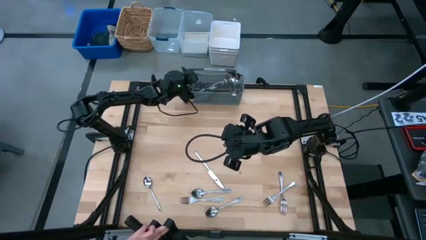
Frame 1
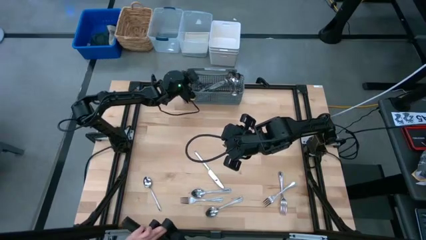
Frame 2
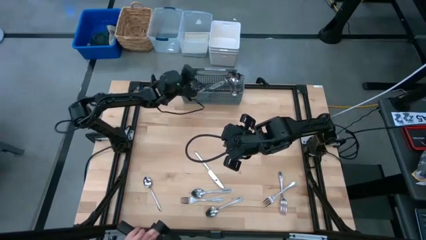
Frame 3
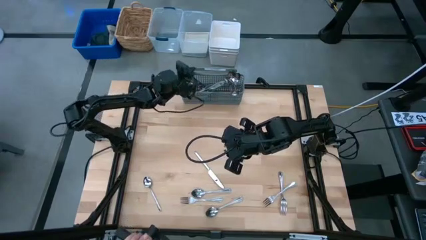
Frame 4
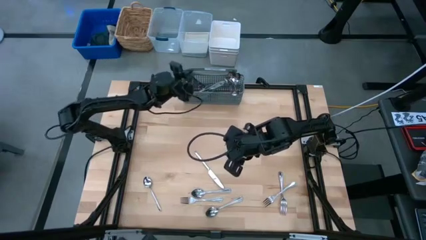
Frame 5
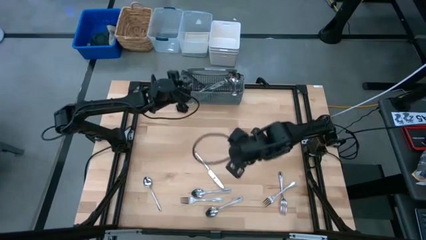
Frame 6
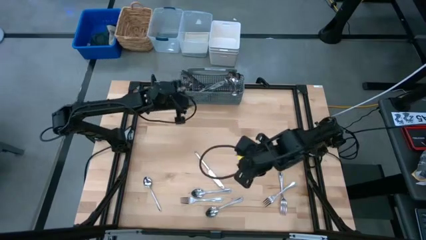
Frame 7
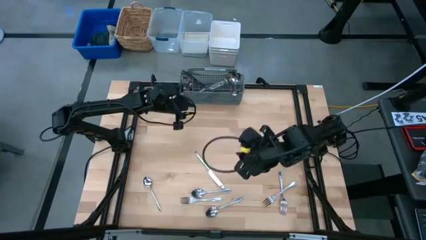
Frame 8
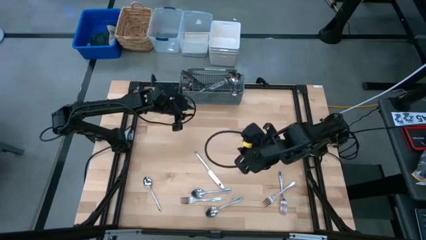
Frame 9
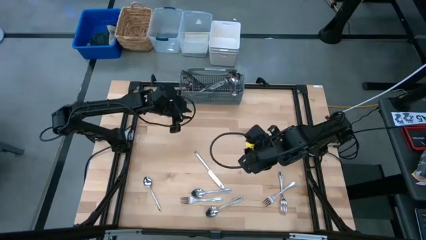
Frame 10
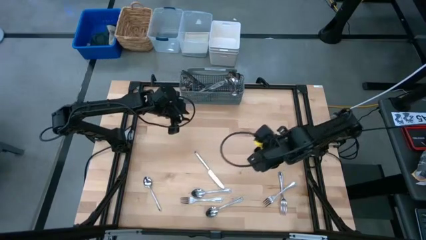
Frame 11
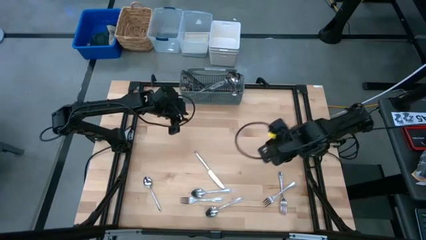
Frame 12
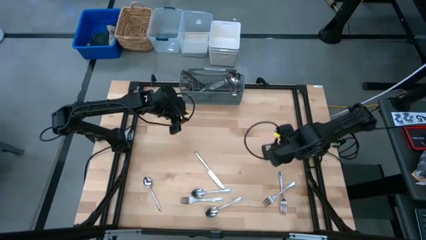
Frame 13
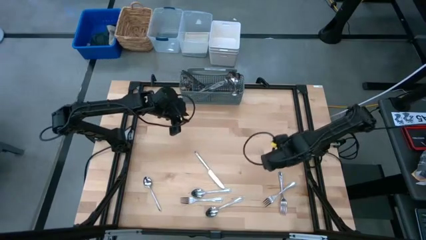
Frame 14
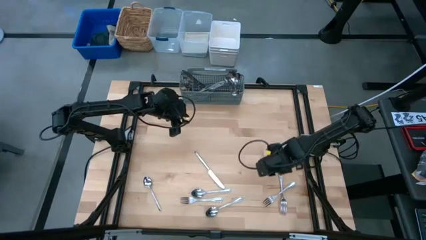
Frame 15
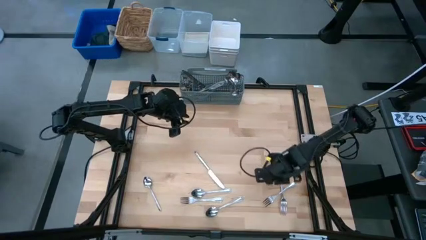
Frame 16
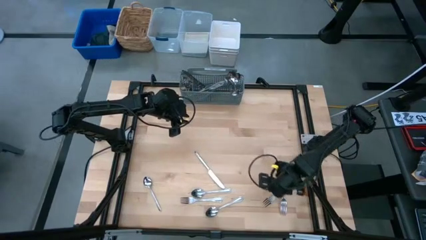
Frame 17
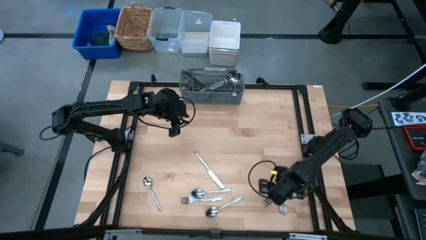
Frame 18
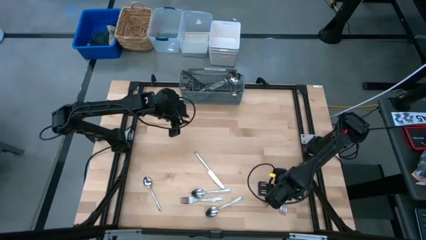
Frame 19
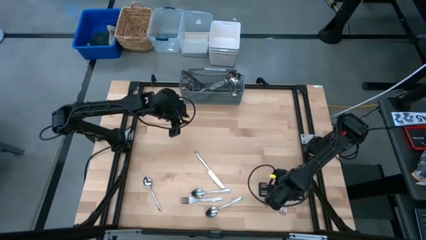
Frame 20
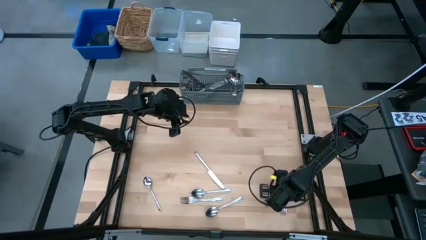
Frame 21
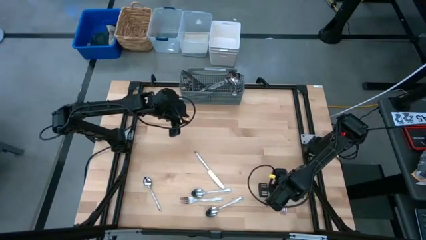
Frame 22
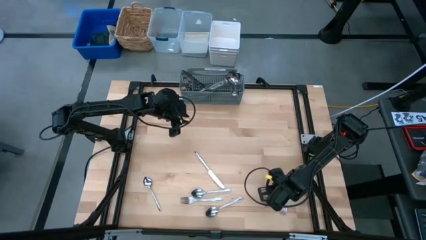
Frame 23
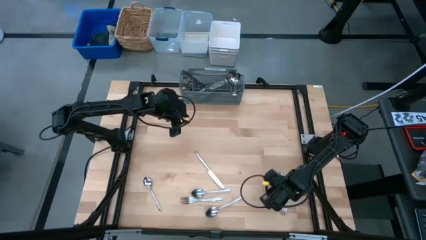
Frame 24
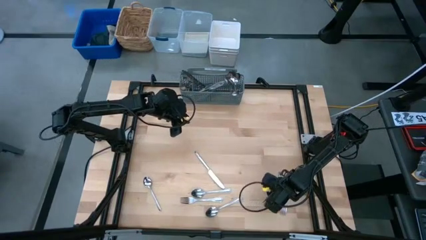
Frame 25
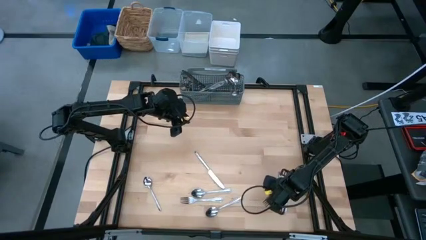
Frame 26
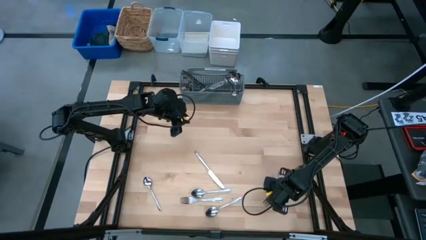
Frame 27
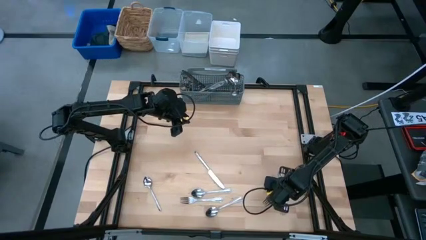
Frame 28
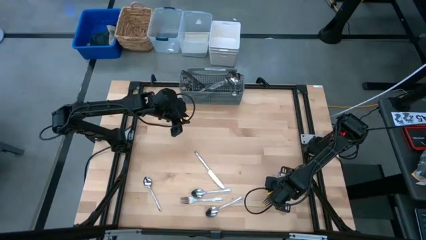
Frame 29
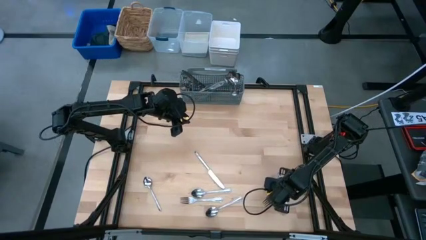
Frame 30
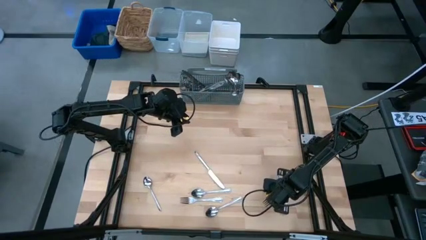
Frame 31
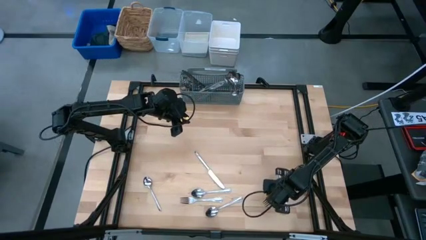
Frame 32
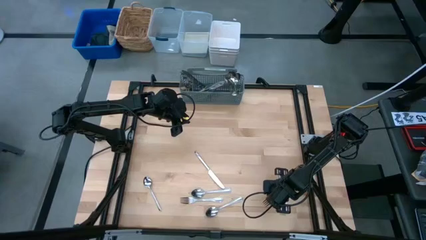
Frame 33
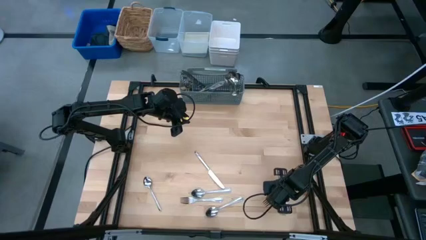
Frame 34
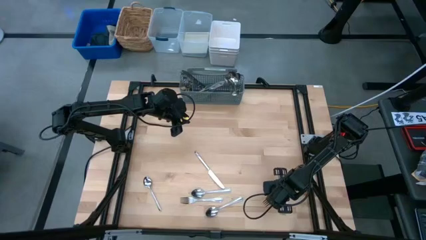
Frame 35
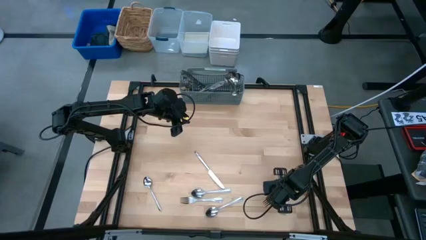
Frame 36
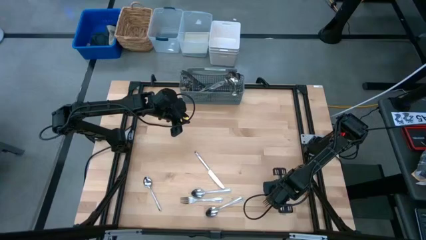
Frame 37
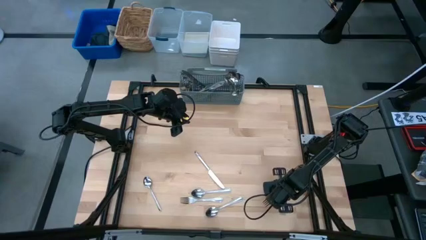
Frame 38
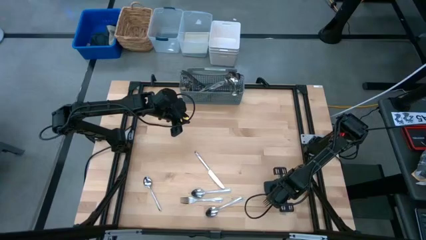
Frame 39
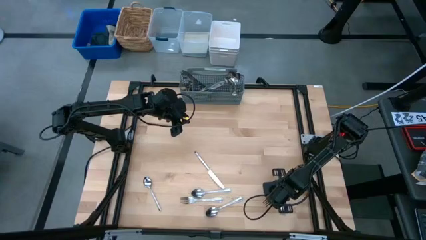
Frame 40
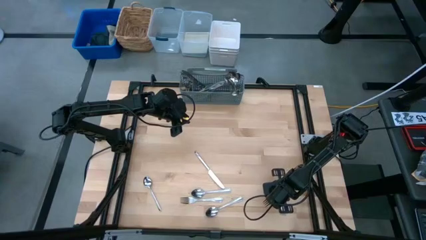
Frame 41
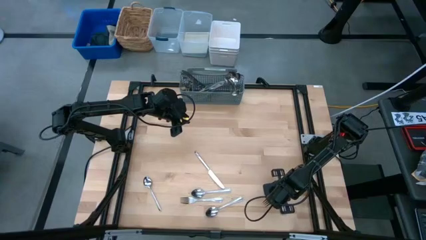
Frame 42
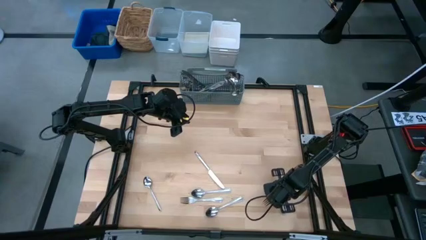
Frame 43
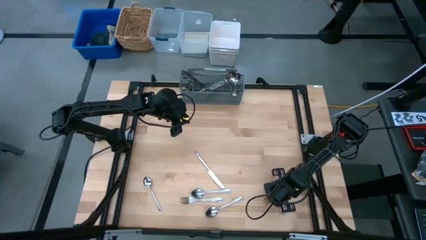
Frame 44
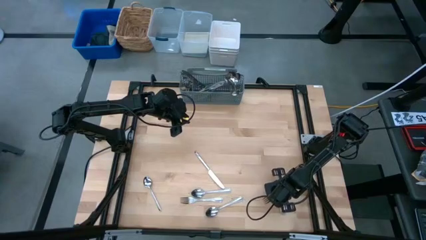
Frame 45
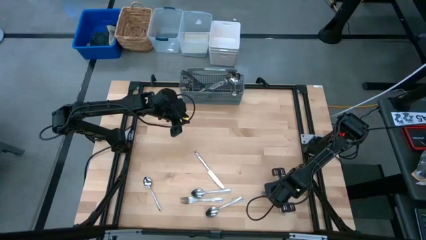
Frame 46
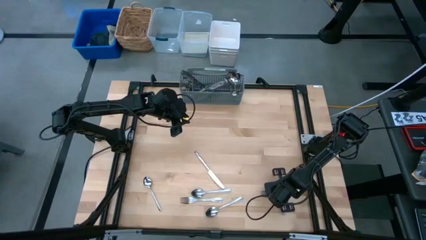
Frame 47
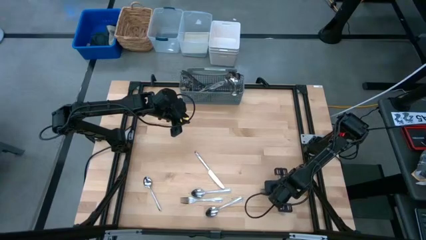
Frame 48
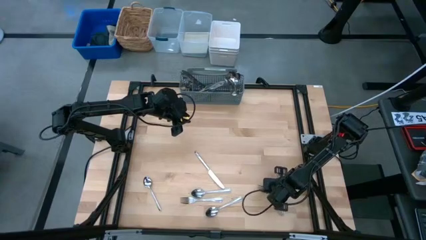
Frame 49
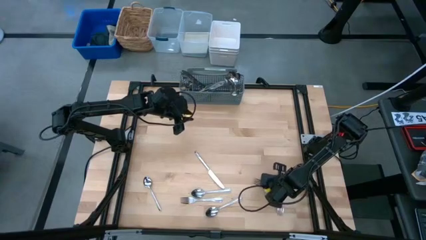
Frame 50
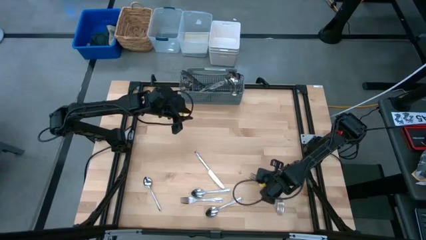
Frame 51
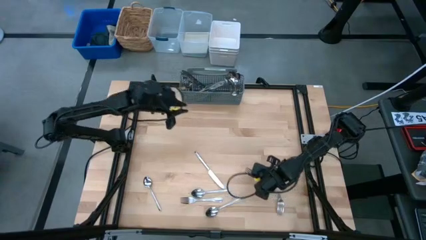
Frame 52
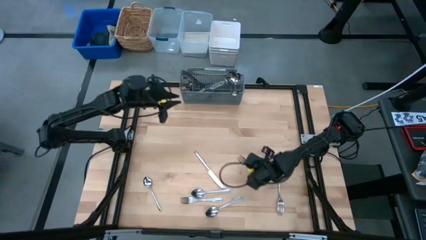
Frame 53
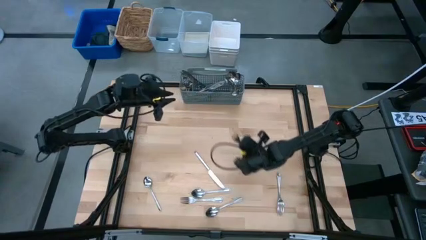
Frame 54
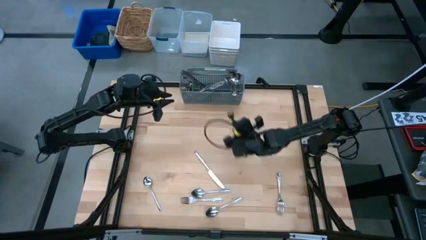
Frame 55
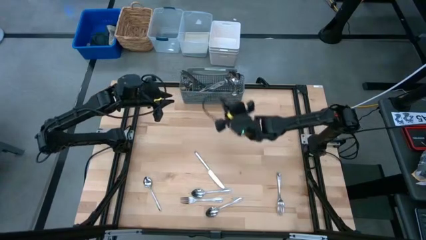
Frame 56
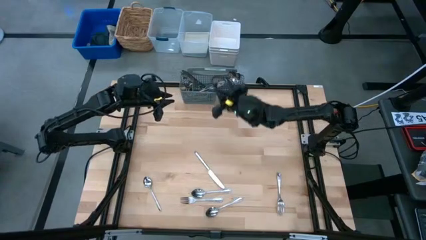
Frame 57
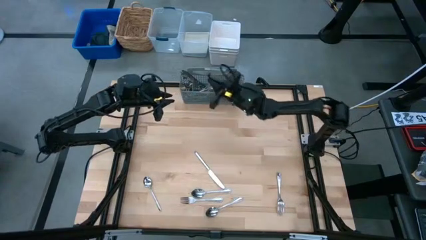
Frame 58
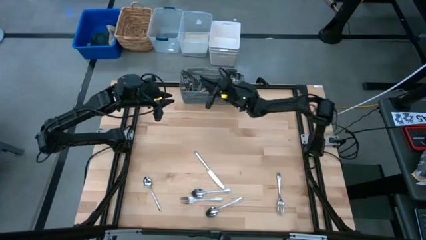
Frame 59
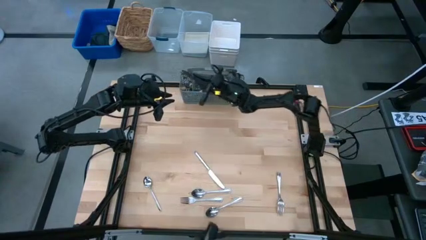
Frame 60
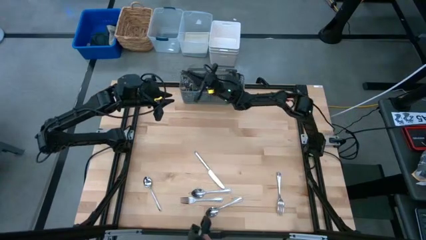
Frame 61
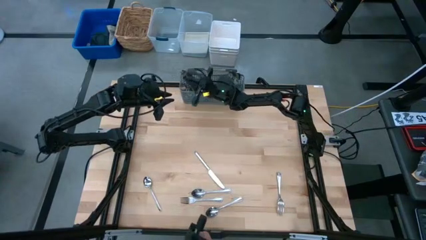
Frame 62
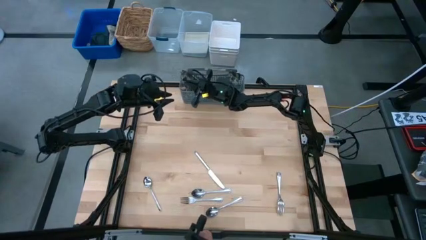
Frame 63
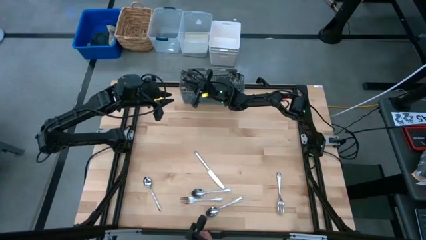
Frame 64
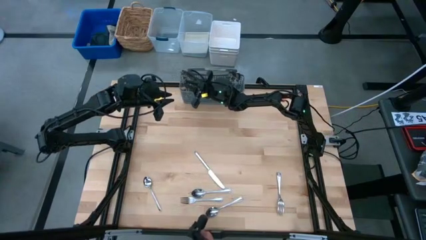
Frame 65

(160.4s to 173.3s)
Put the silver fork into the dishwasher utensil holder
